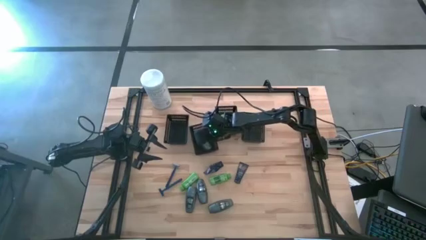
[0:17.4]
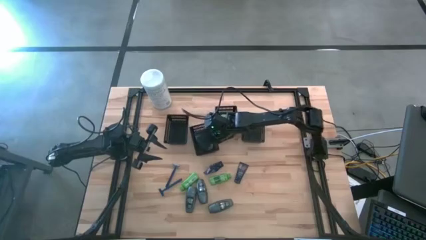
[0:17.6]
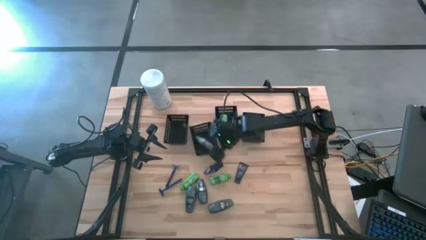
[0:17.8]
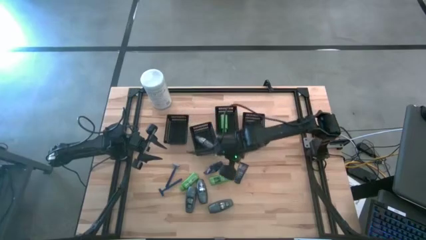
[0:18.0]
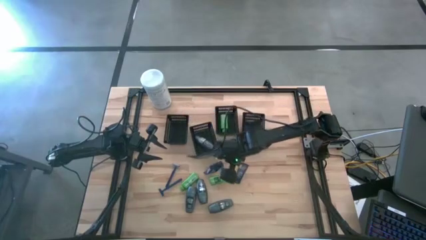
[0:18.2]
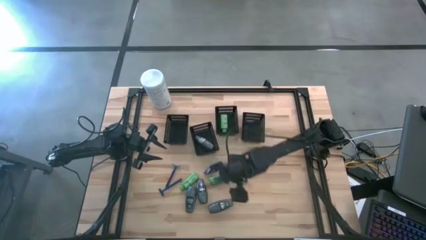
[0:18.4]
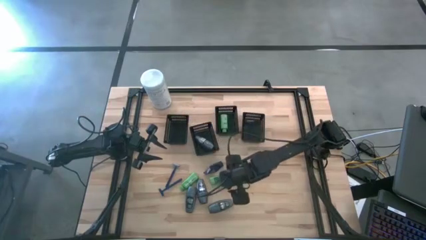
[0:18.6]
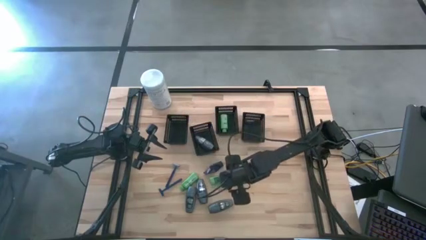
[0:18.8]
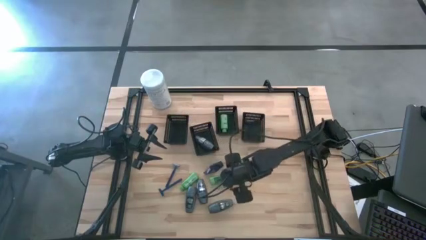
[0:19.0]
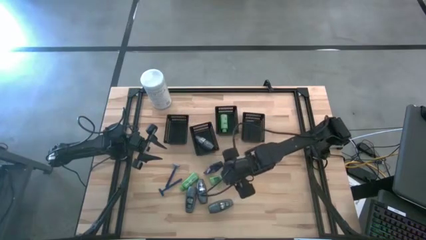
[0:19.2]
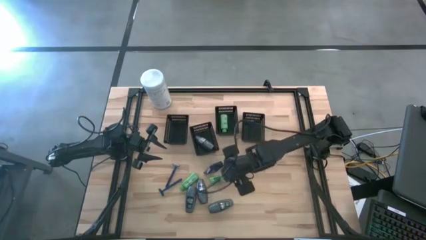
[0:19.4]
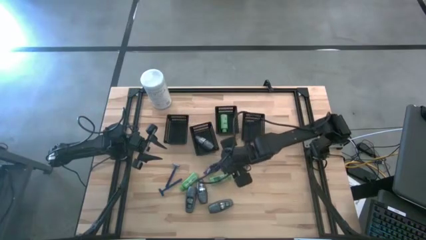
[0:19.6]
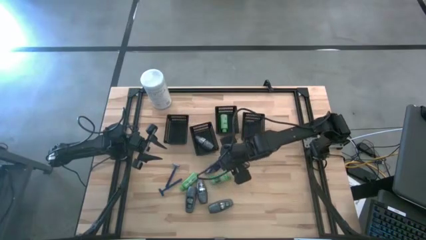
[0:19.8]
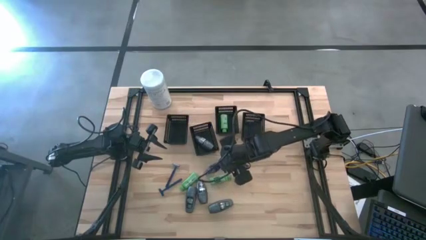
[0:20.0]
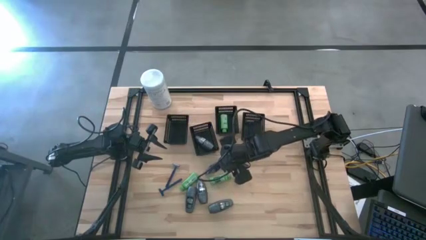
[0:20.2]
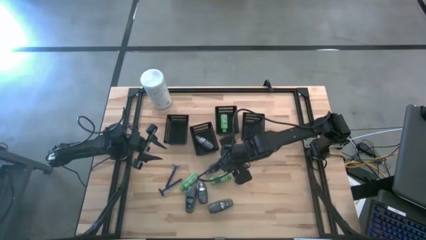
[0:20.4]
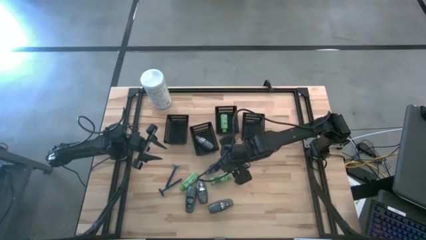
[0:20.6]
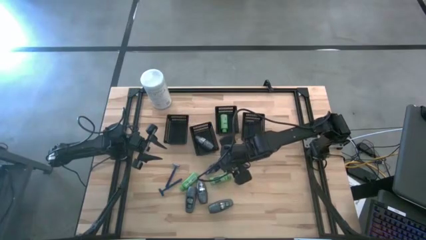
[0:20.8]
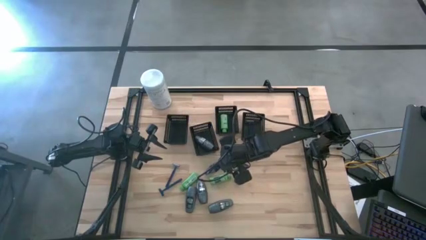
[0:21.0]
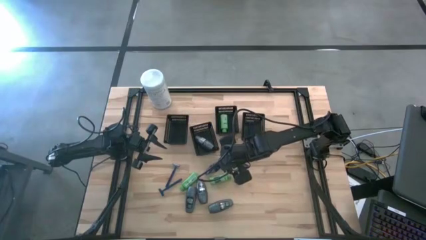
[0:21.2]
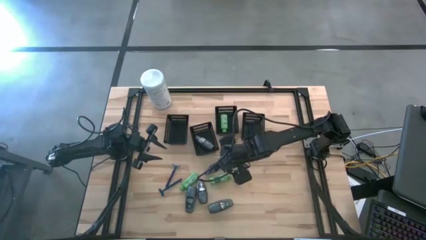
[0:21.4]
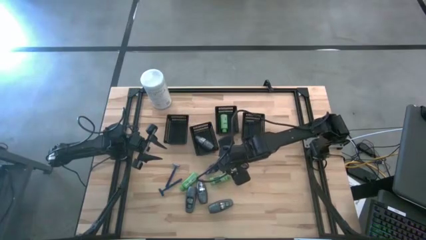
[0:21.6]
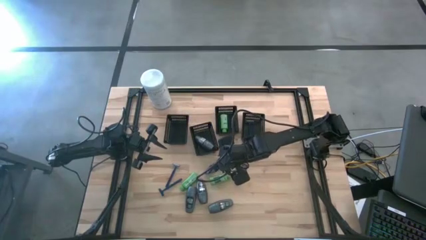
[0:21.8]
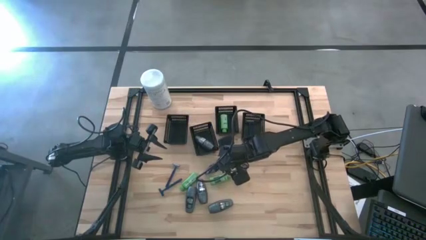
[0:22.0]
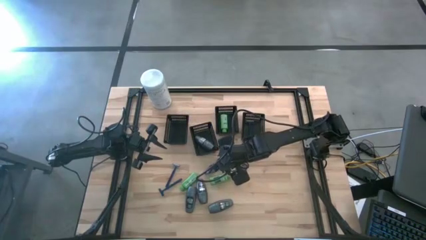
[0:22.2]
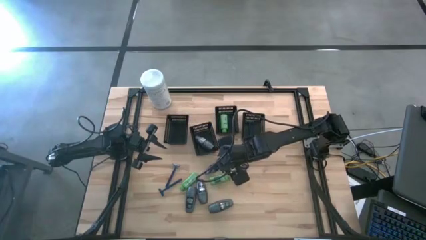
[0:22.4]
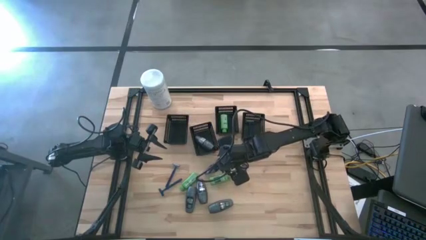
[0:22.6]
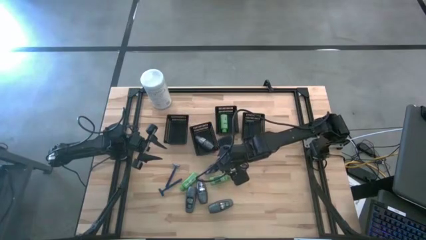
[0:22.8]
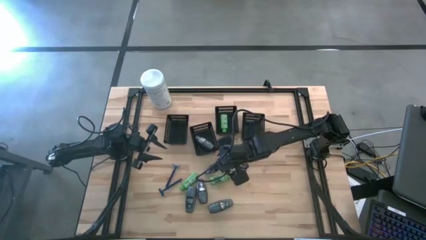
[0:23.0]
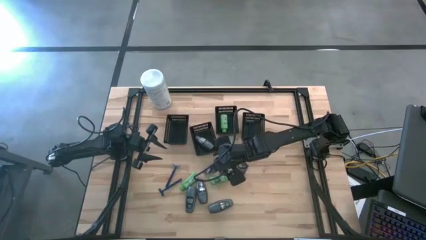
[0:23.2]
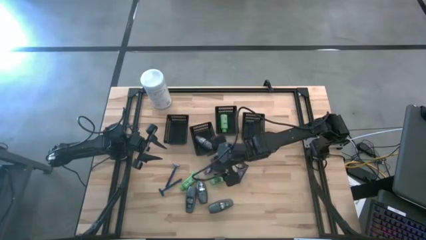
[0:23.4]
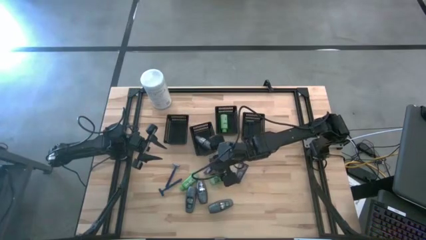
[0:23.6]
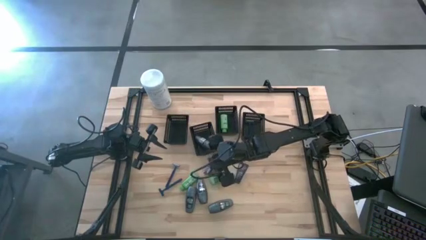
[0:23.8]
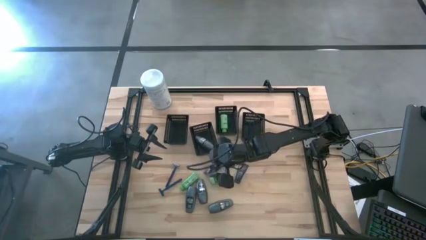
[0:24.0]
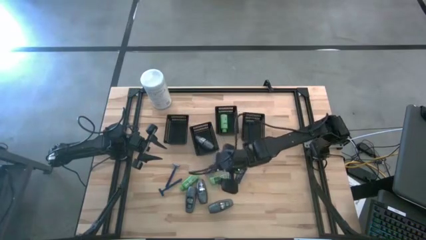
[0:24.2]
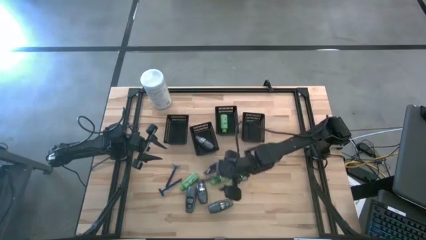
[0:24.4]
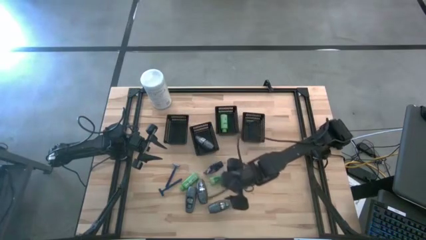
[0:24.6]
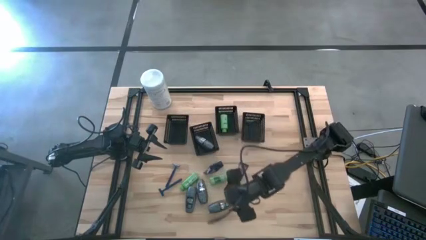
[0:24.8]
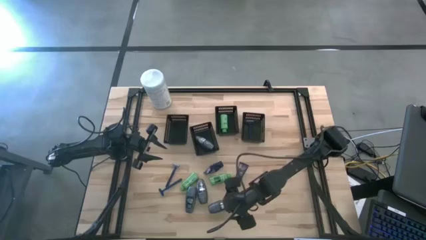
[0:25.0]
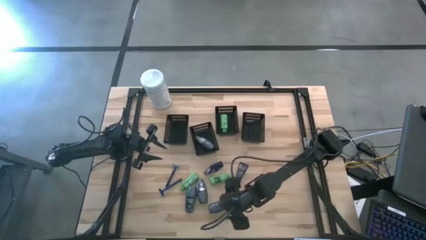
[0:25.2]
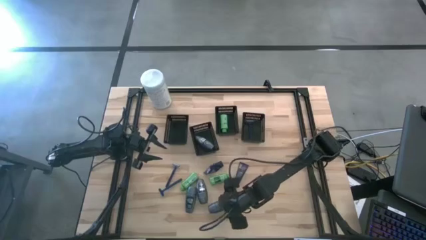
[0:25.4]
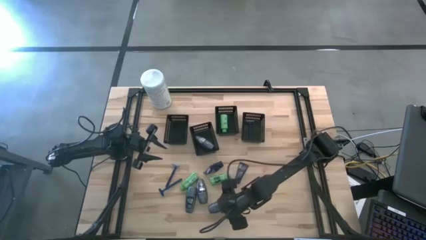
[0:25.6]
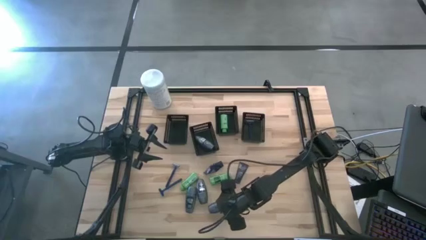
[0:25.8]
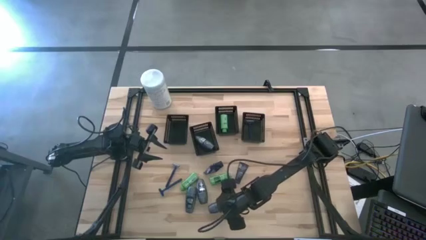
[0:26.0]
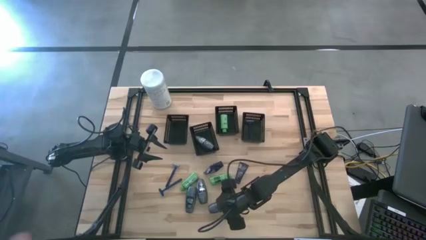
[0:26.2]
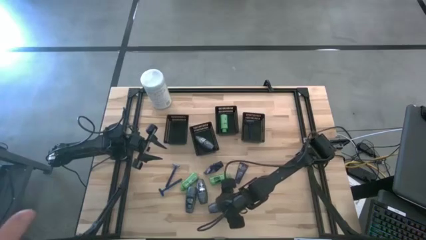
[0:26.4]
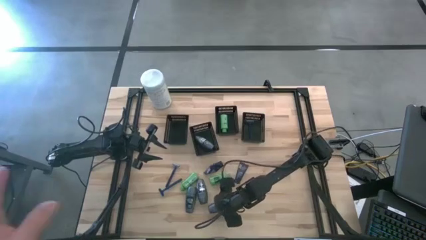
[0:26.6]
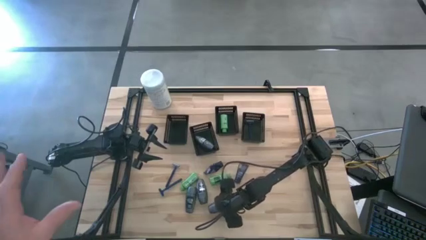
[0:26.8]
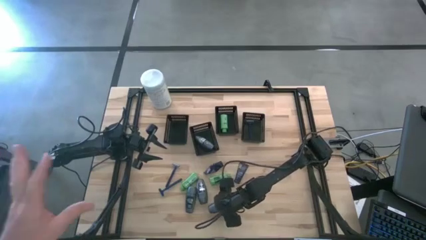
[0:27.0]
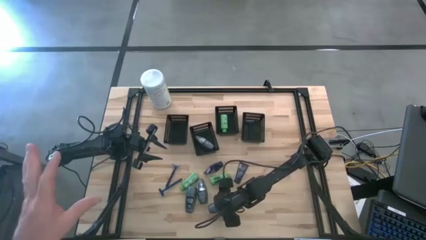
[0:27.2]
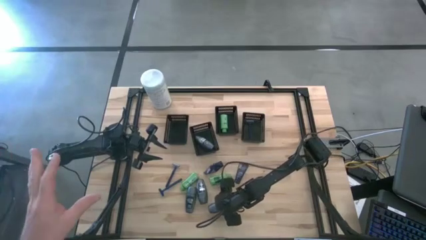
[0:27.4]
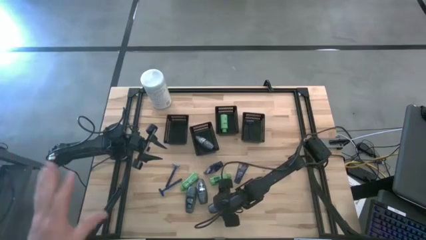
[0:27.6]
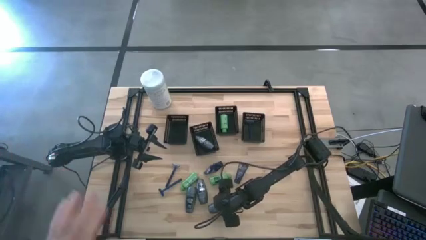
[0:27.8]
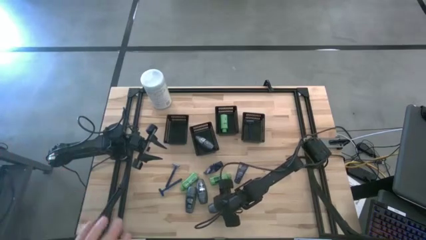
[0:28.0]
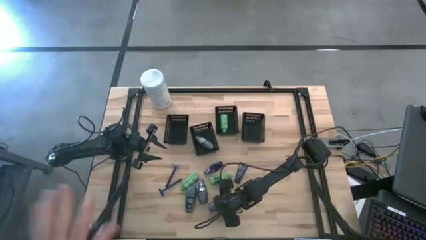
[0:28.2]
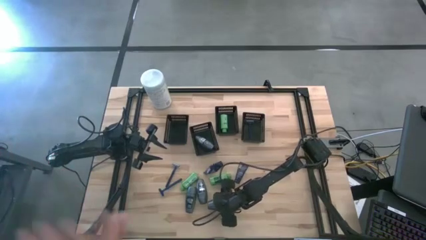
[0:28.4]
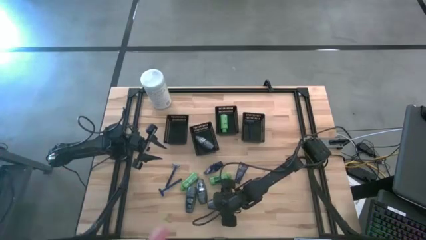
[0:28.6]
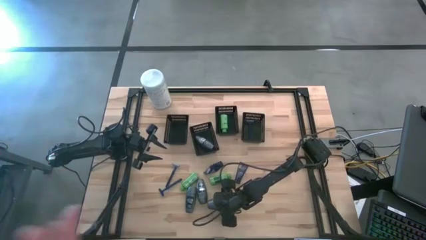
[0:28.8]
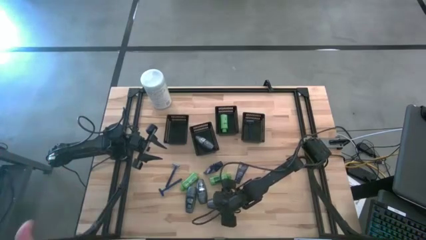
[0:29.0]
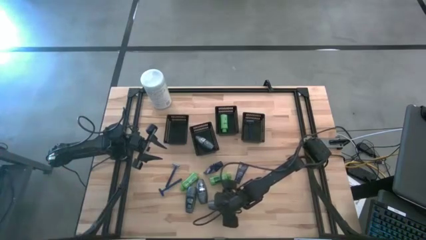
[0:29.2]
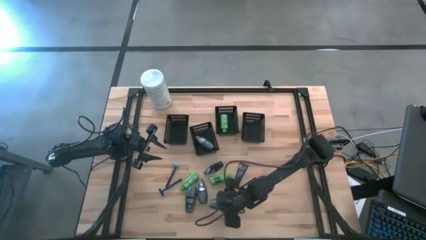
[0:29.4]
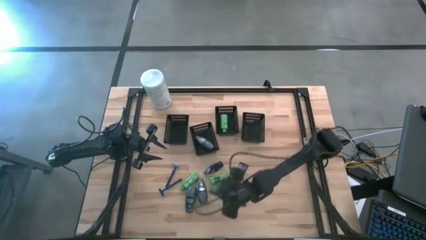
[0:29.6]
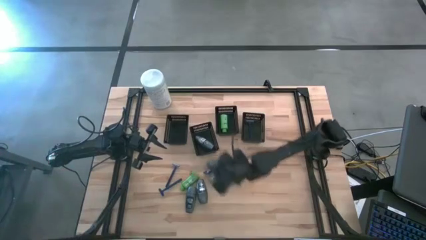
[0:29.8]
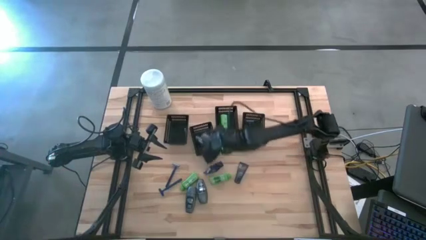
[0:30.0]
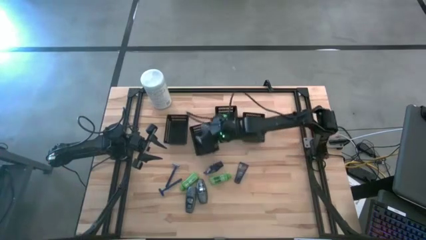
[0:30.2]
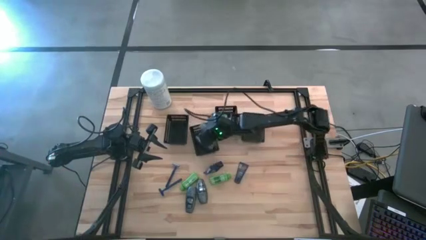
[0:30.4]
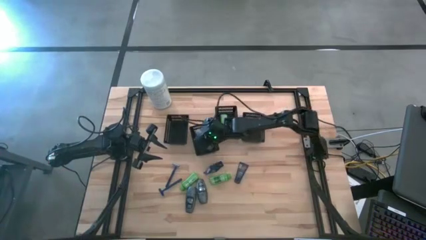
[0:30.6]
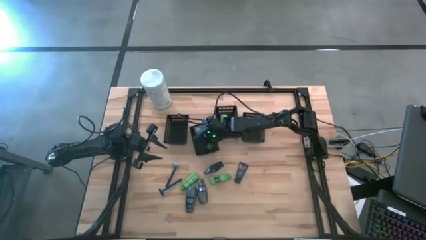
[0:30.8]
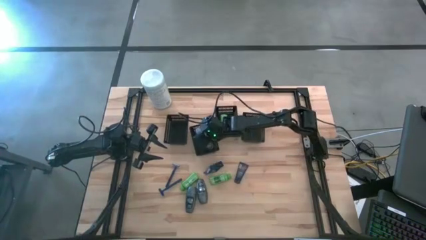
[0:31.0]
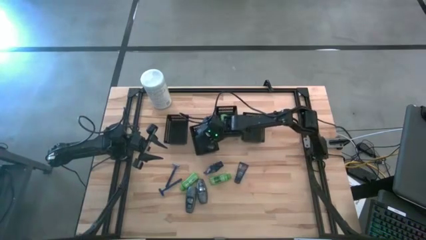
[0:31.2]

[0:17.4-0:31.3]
Task: Pick & Place Travel size toiletries
Put the right deodorant into the middle left bin

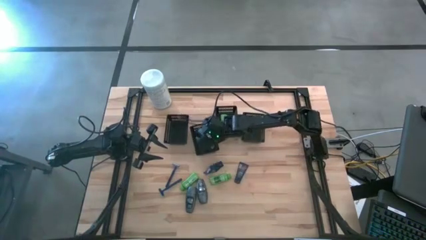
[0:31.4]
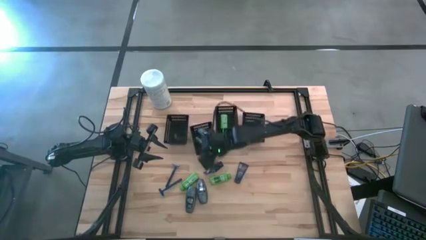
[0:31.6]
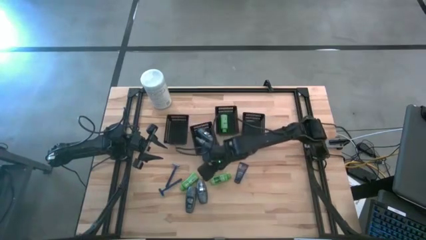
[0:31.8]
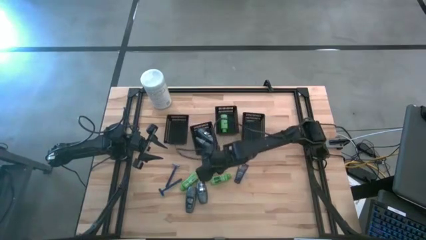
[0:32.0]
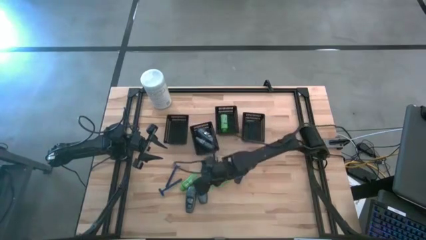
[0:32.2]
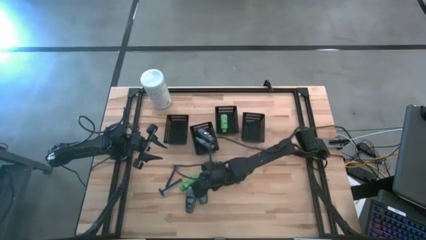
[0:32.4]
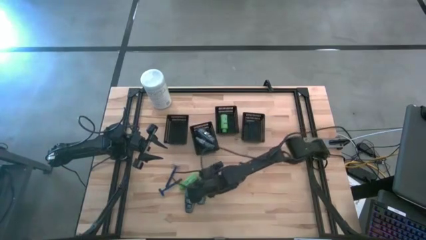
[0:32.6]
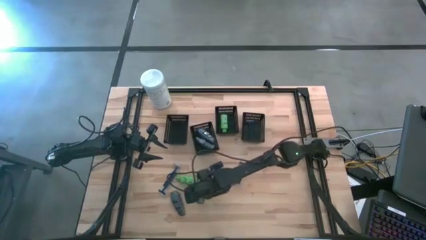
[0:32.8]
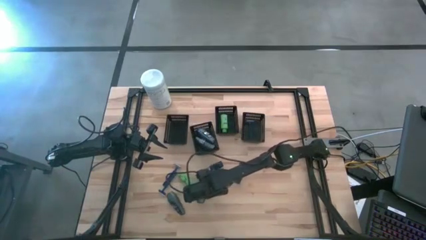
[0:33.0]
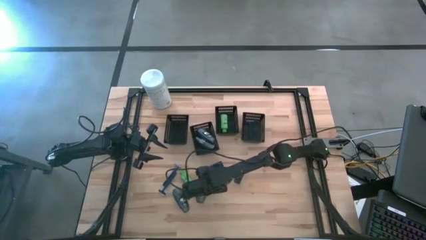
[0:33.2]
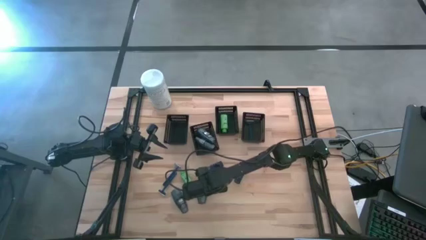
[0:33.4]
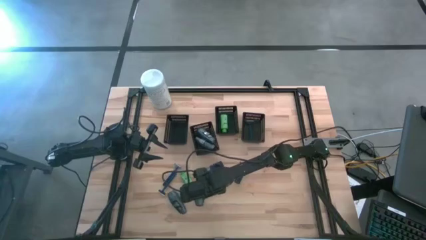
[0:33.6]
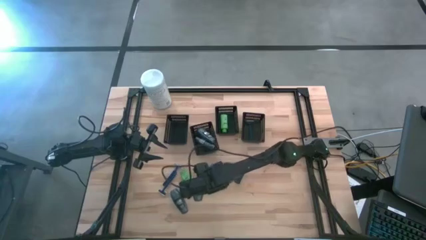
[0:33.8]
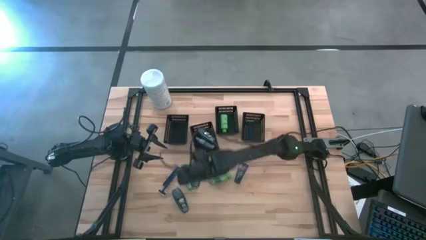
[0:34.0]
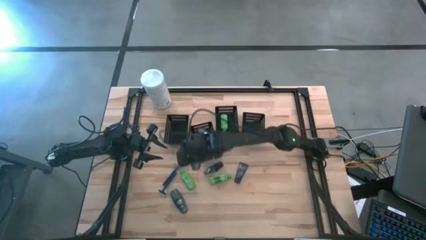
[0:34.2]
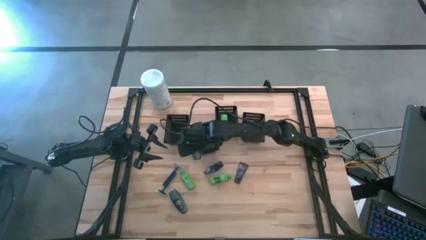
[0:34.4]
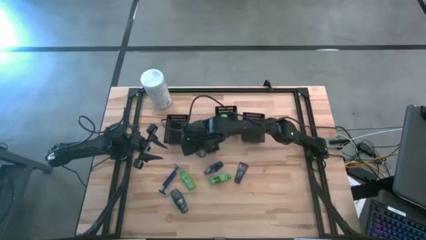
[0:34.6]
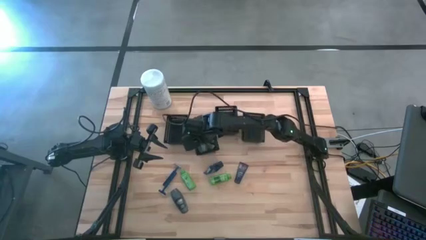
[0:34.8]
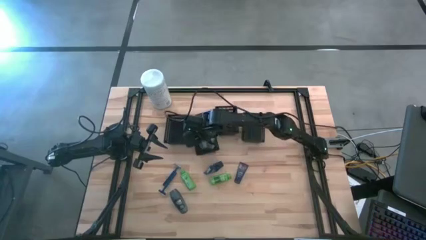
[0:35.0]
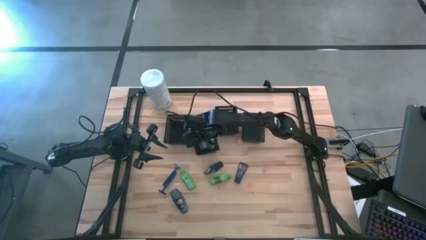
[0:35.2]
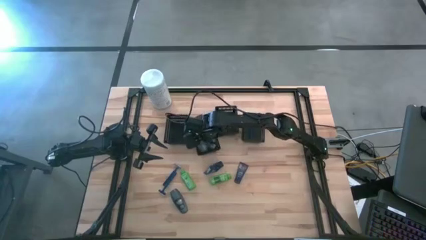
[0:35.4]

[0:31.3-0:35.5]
Put the right deodorant into the middle left bin
